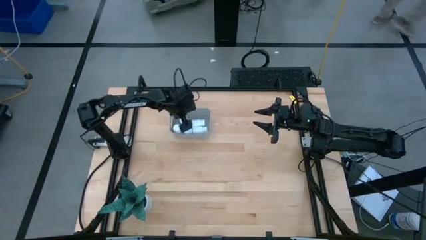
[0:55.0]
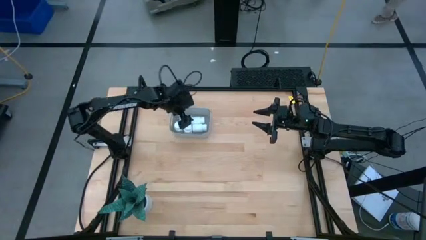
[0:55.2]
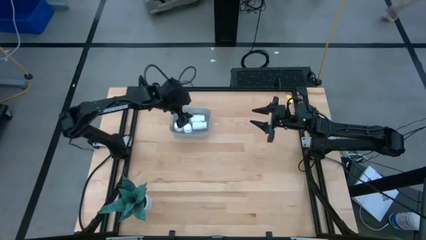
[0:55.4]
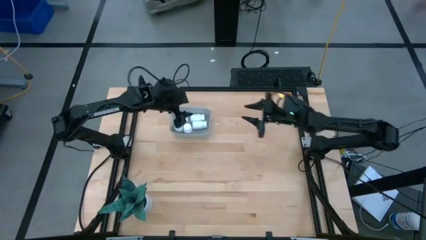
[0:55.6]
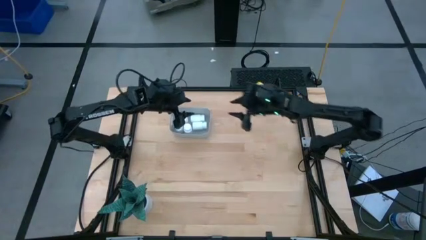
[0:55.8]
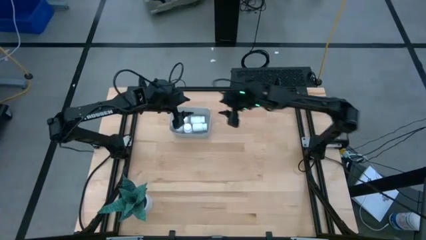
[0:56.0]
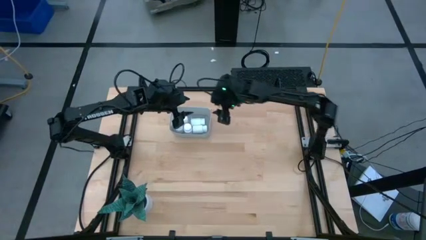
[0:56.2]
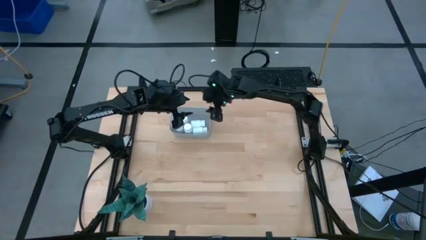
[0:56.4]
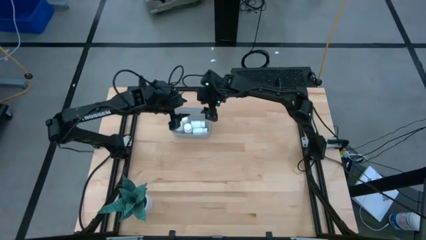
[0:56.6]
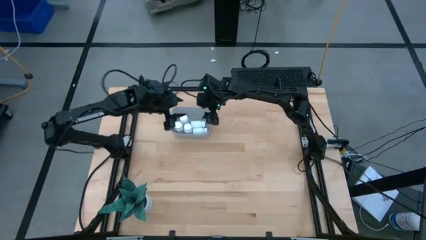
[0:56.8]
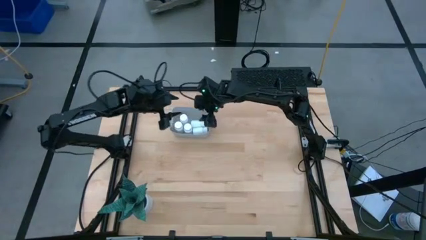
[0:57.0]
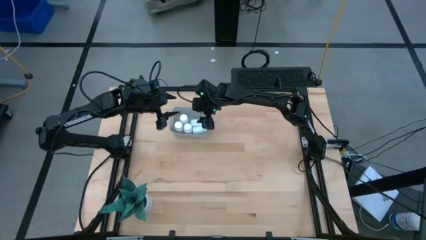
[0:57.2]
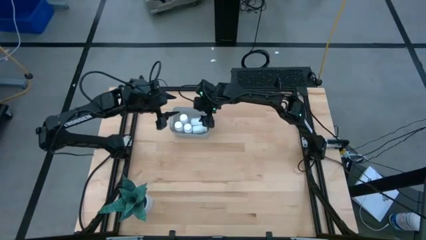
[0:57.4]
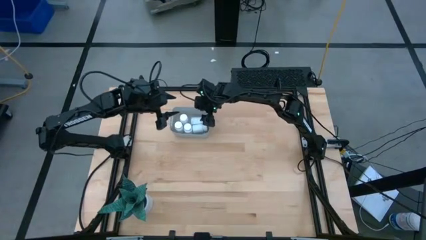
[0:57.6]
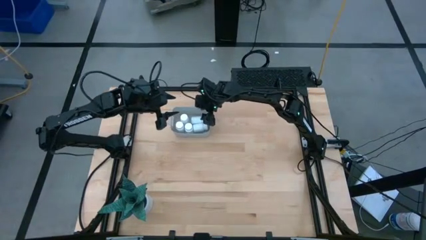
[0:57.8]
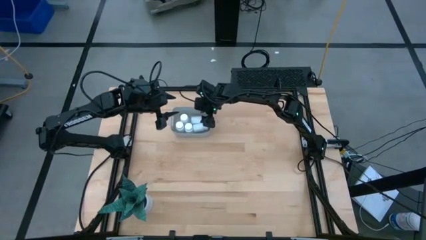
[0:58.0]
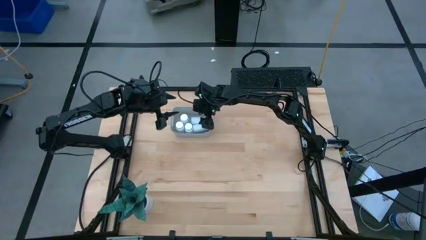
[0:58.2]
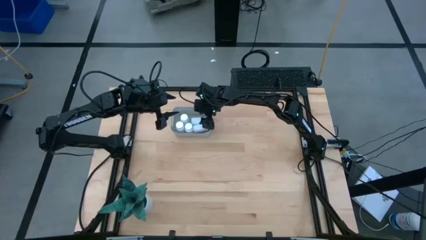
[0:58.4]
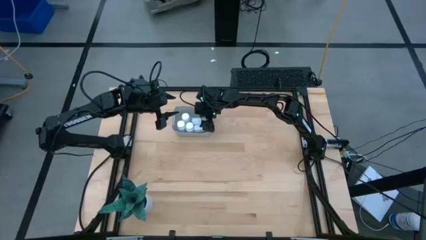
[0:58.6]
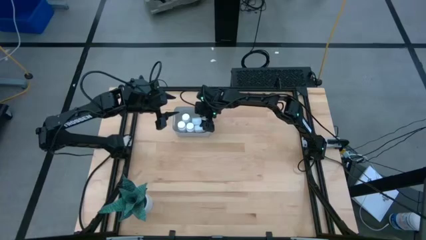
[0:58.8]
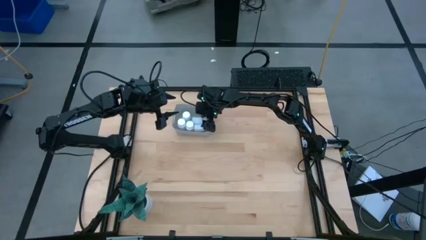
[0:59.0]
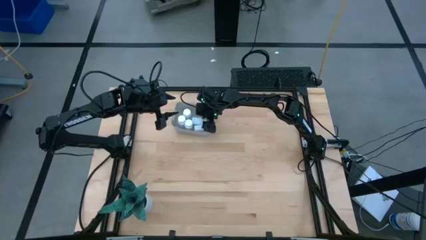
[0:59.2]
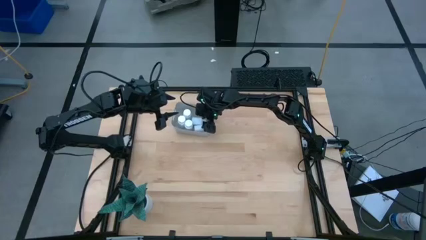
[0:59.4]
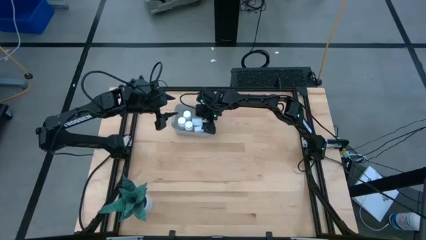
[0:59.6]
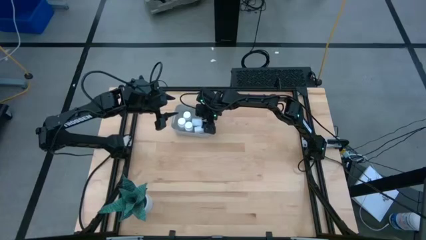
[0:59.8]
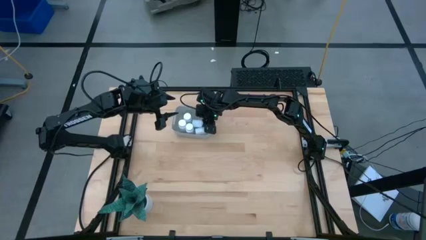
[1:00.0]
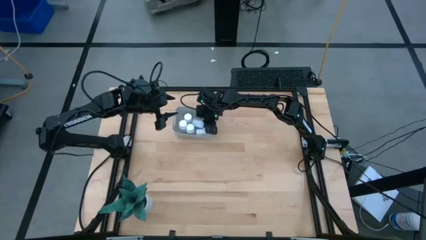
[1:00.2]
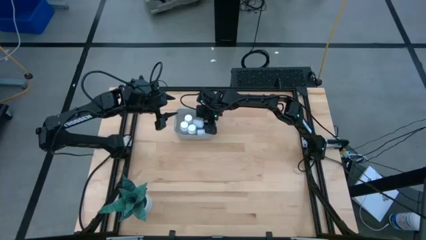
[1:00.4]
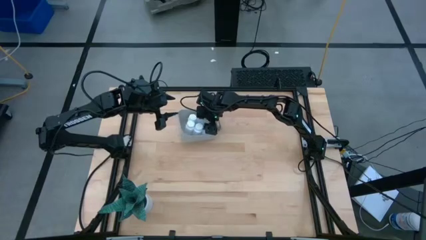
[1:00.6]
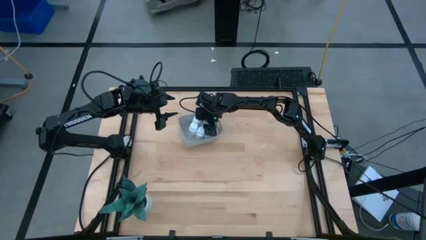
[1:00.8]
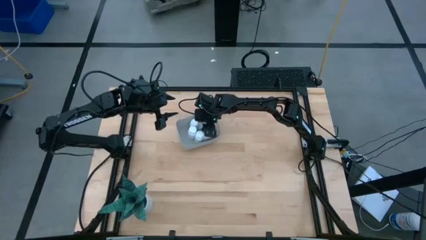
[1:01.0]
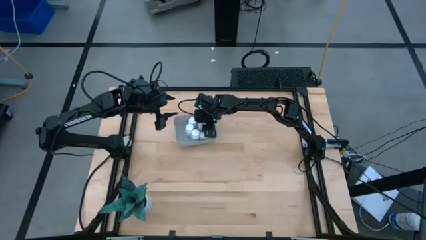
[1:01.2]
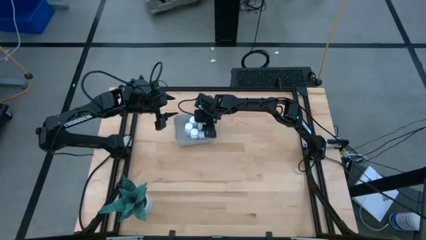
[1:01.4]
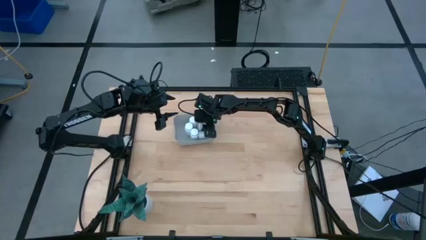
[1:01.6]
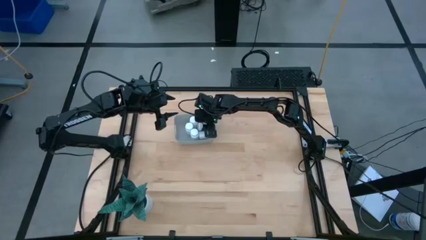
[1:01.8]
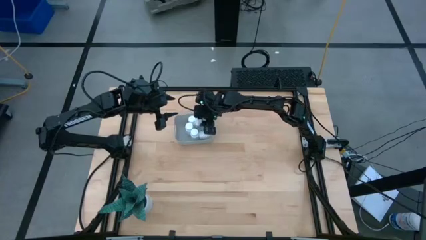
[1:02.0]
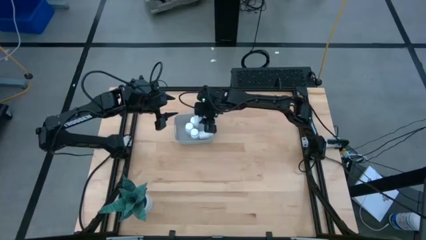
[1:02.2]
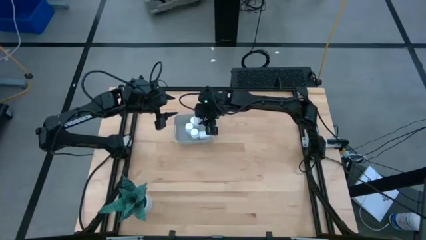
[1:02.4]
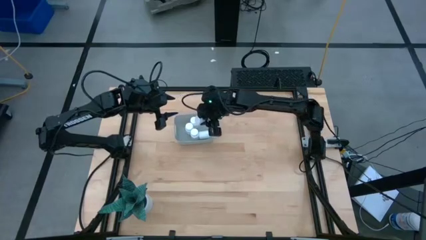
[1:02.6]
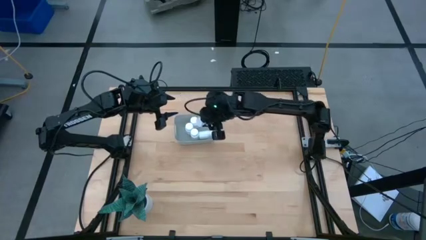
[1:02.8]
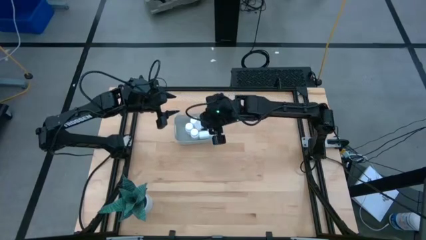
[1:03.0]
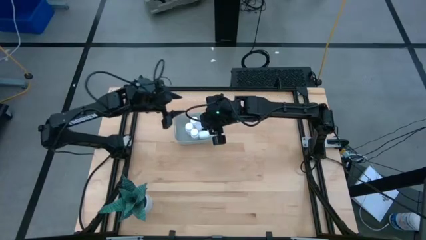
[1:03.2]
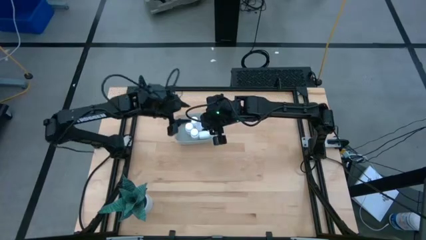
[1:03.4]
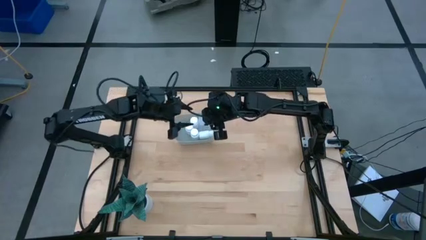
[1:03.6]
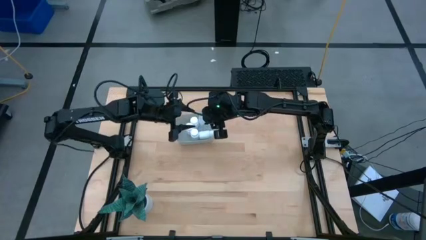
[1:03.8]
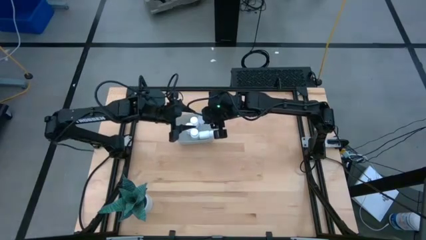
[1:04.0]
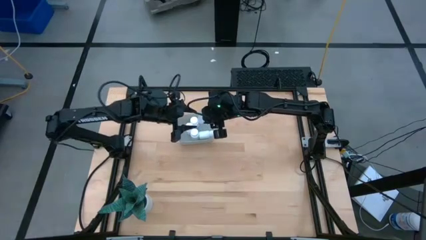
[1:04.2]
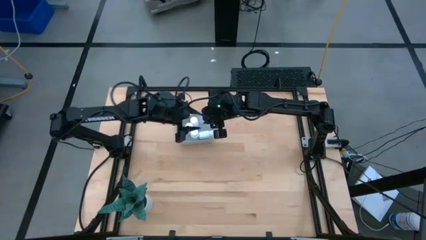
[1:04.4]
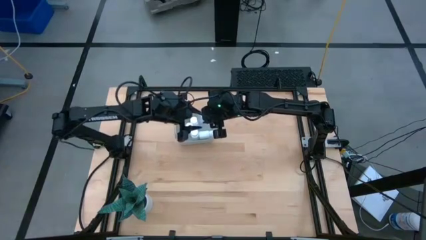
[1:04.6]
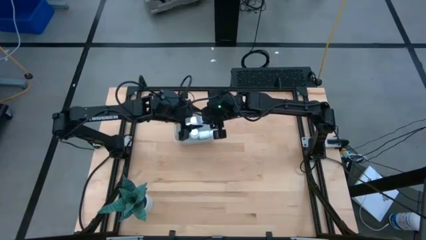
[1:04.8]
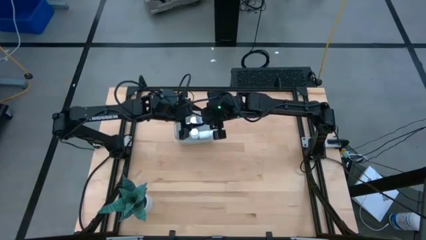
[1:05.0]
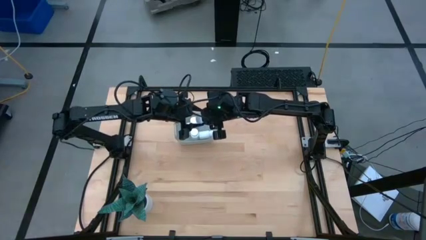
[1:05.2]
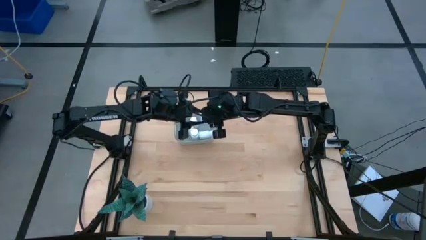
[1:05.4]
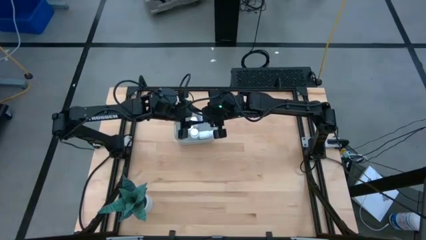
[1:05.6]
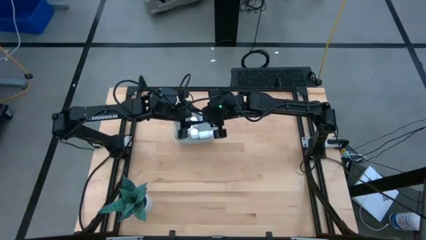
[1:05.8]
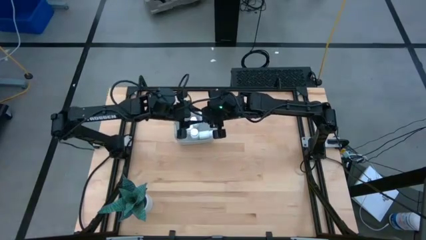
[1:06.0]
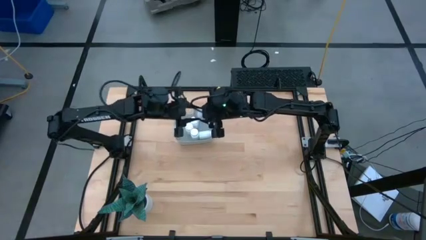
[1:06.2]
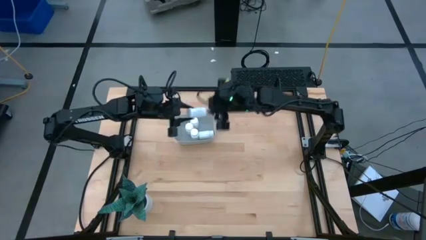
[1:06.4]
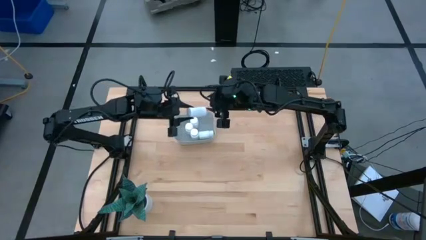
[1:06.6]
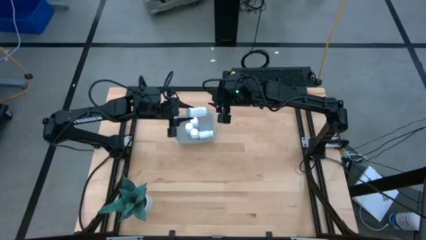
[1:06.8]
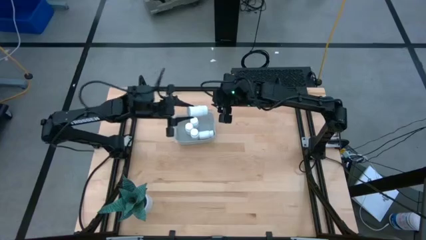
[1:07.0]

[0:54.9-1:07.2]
Task: Pick and place pill bottles into a basket
Adjust the white pill bottle in the gray bin

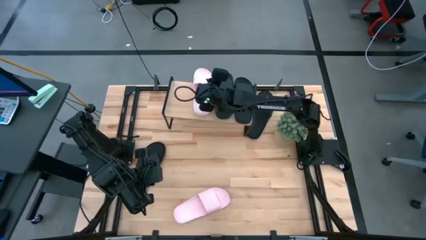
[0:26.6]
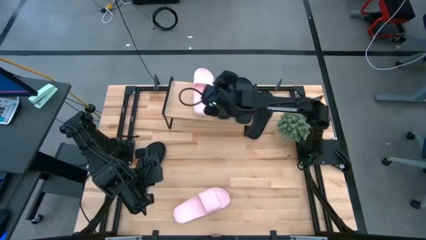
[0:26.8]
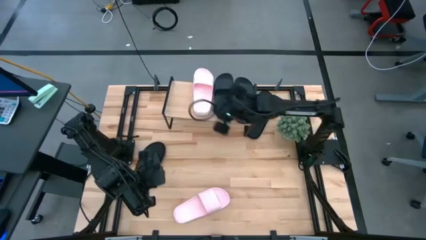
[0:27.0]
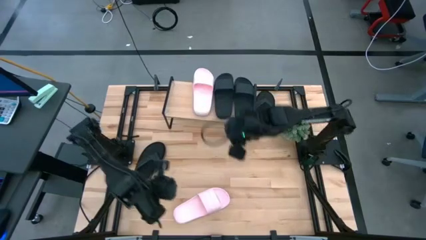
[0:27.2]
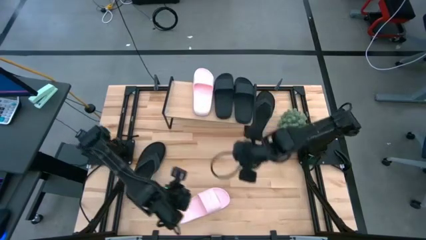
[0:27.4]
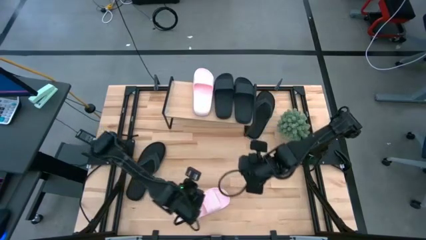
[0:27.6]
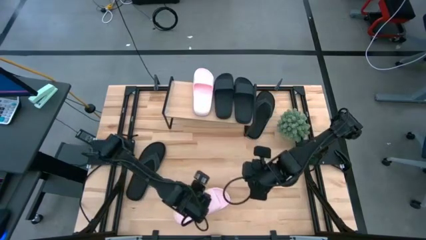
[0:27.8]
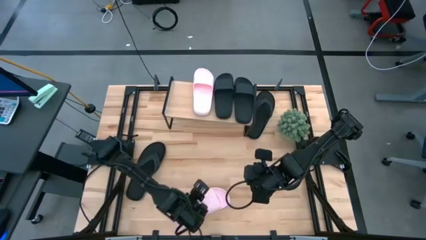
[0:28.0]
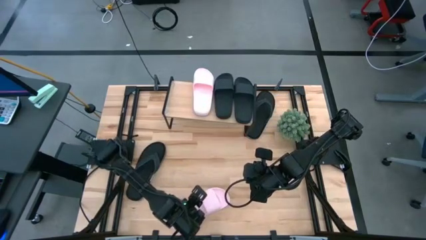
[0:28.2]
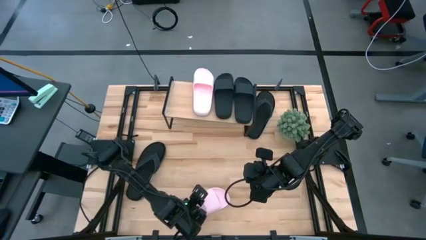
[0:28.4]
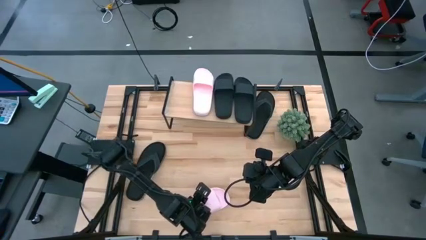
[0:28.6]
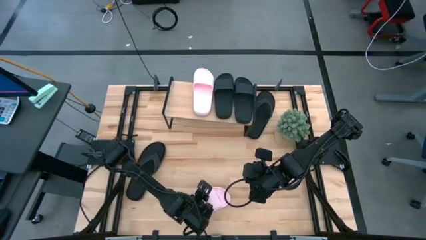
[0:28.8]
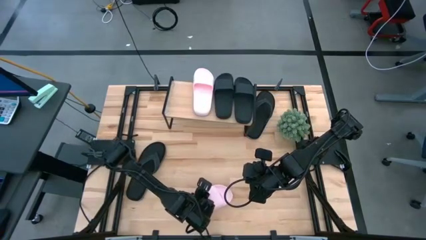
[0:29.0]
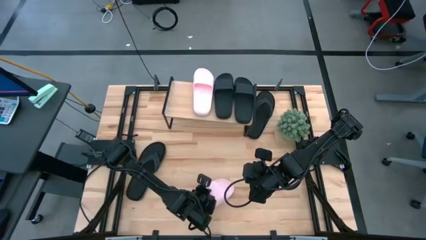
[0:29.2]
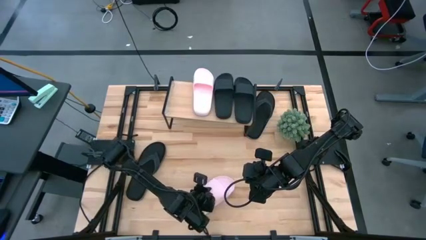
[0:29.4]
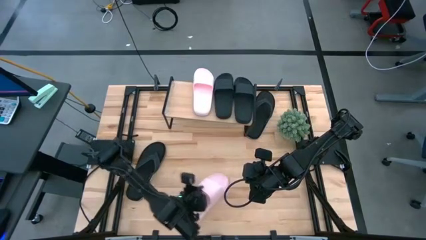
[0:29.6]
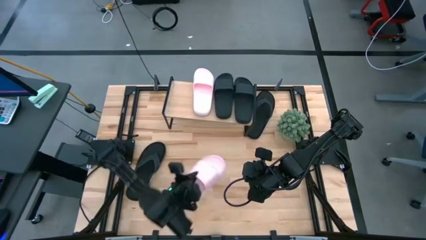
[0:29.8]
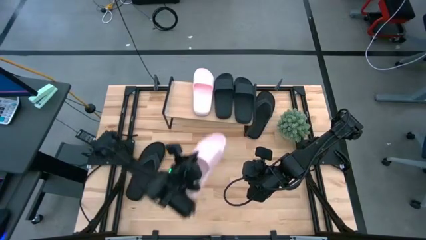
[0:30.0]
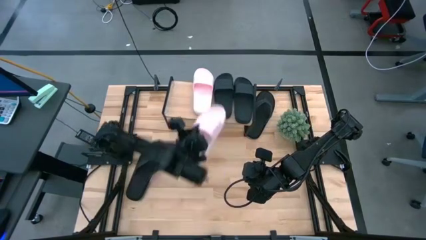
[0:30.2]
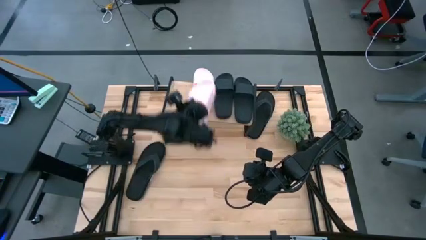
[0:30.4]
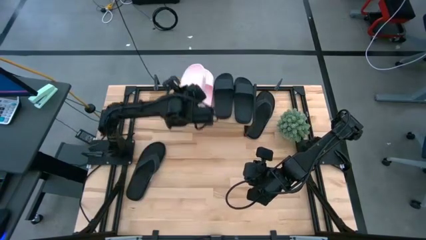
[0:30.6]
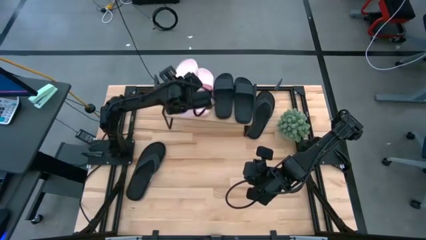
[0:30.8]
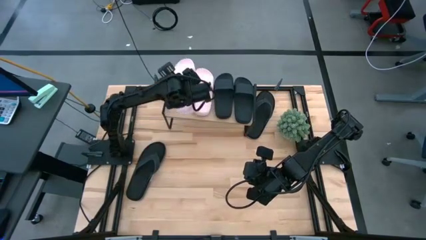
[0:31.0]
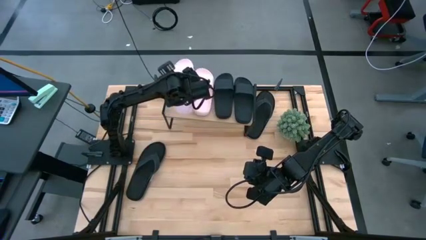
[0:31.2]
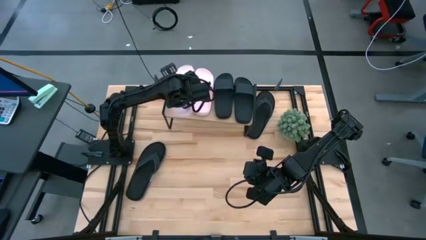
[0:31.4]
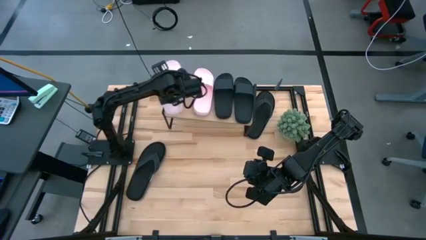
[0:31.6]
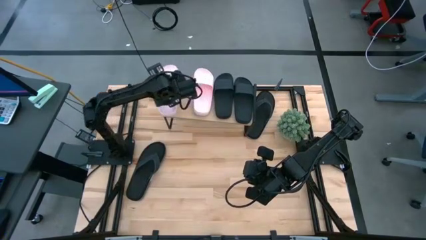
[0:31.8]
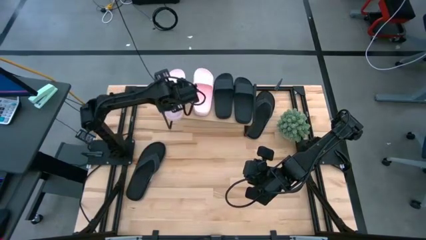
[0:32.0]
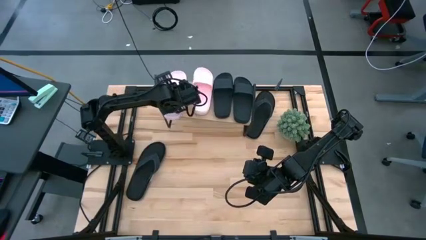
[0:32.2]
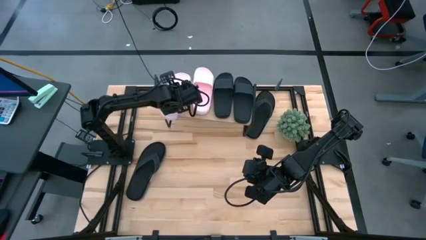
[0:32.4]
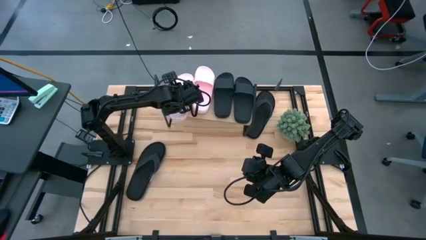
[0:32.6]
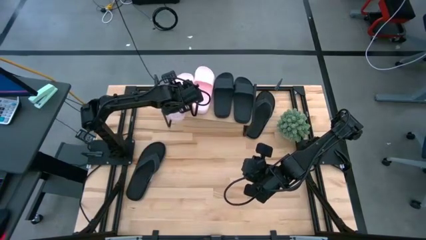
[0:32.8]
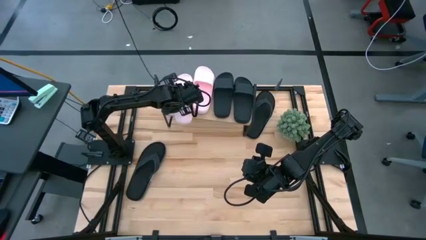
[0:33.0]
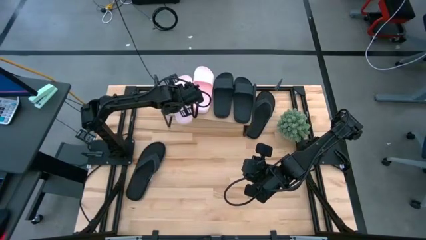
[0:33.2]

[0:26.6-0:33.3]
Task: Pick and place slides into the shelf
Put the left pink slide on the shelf
